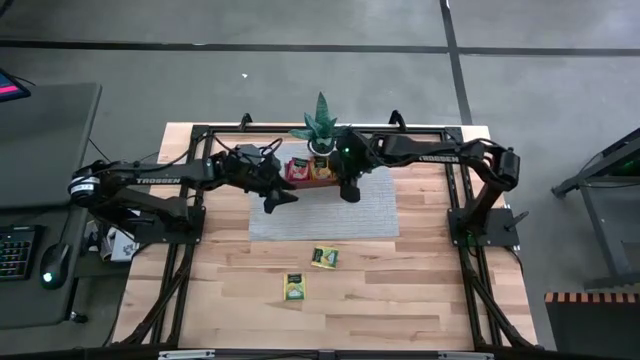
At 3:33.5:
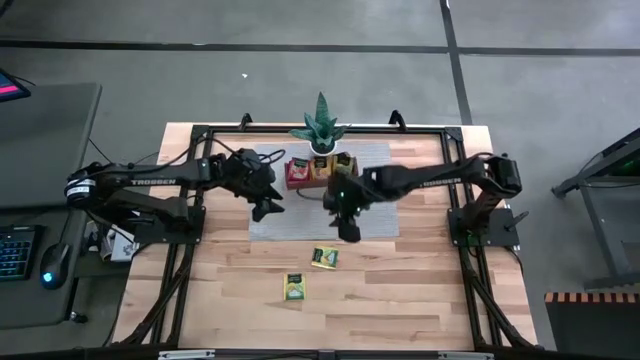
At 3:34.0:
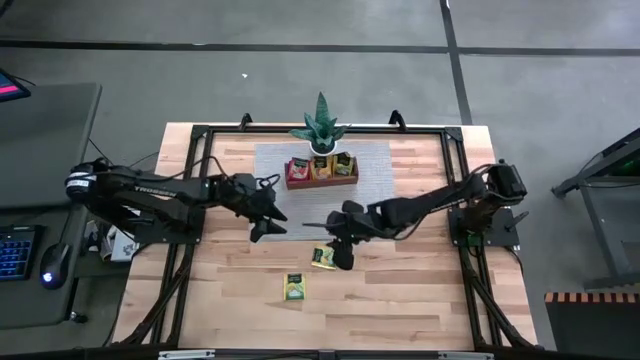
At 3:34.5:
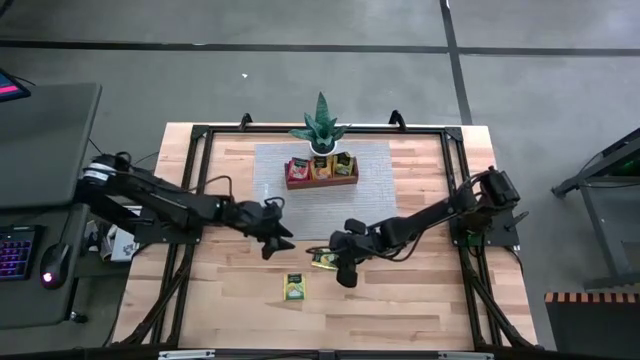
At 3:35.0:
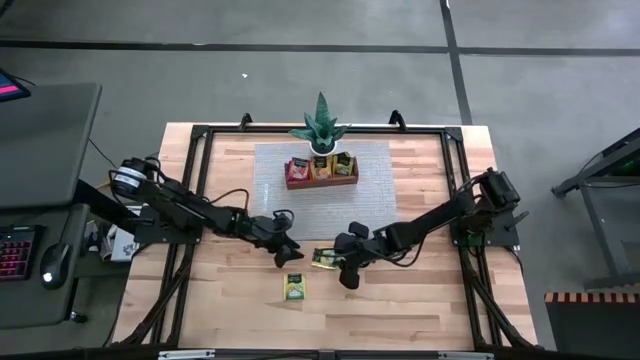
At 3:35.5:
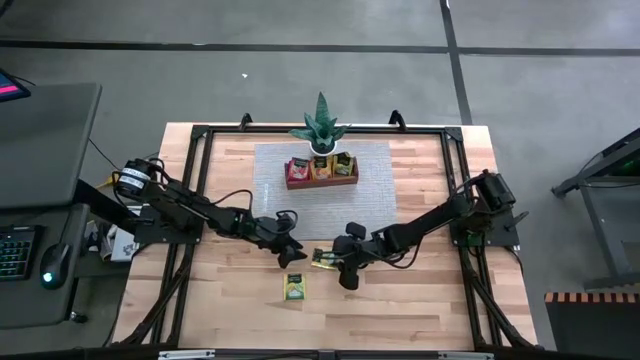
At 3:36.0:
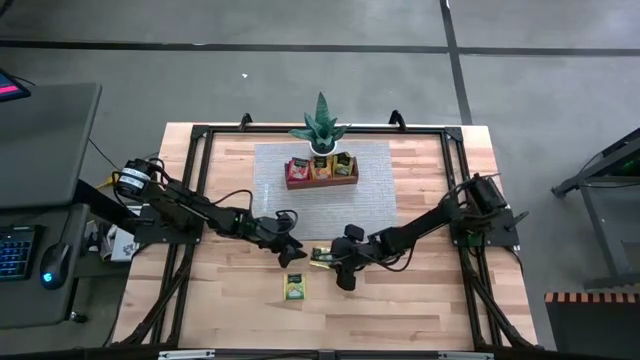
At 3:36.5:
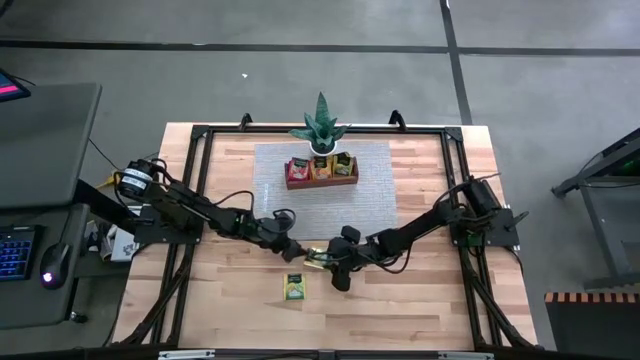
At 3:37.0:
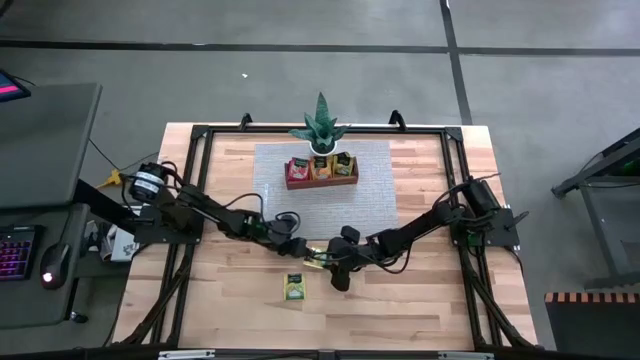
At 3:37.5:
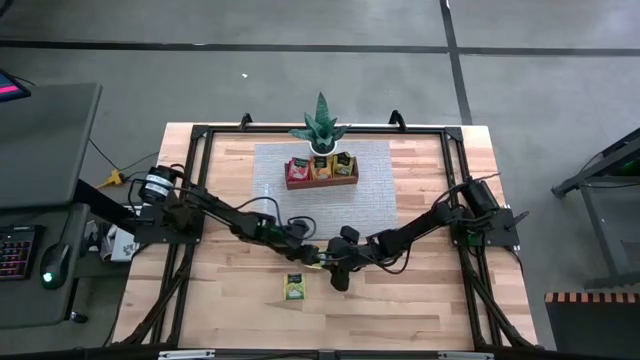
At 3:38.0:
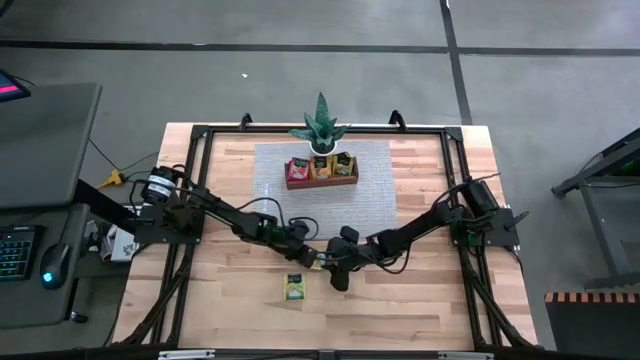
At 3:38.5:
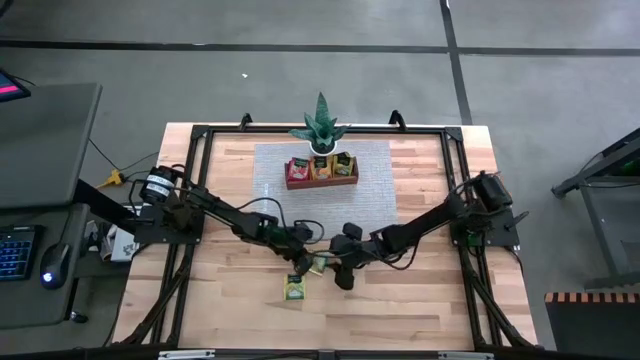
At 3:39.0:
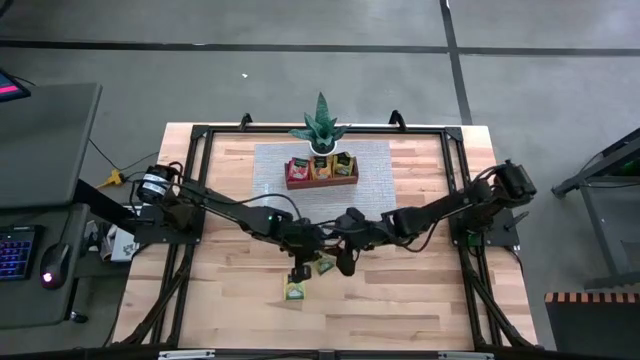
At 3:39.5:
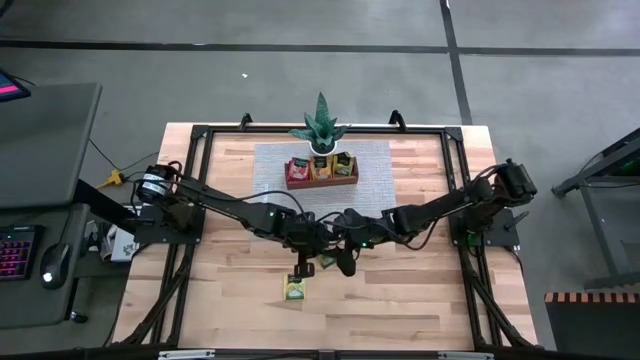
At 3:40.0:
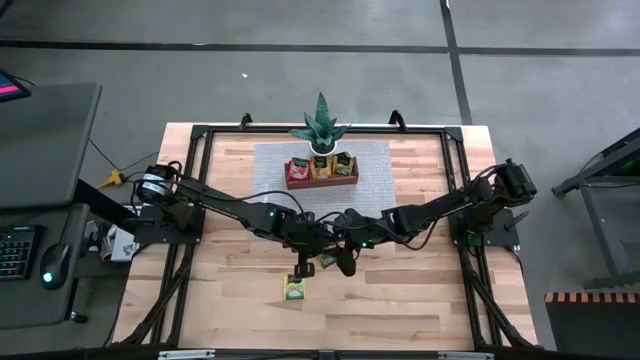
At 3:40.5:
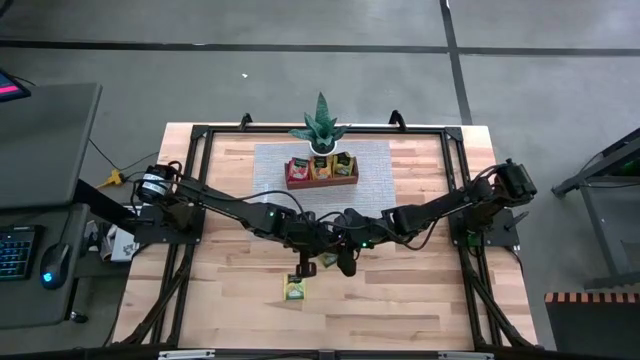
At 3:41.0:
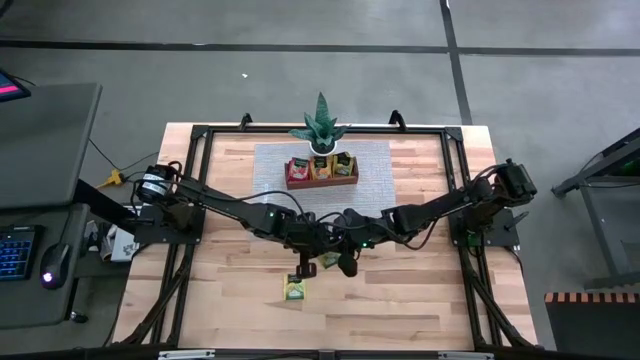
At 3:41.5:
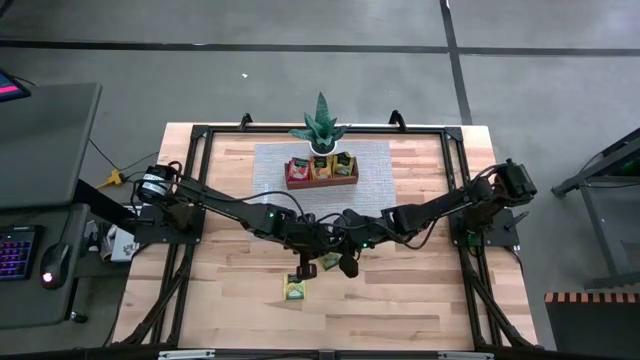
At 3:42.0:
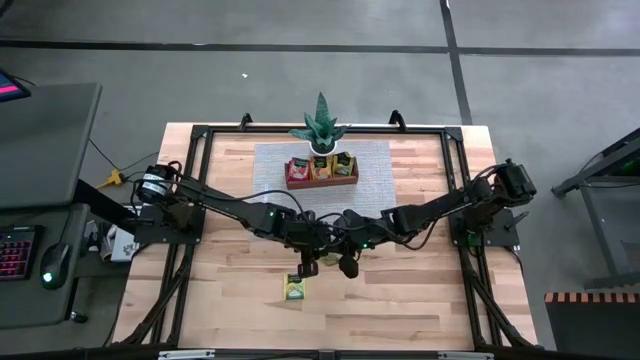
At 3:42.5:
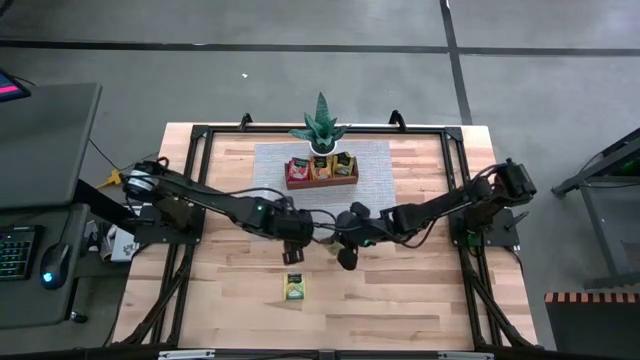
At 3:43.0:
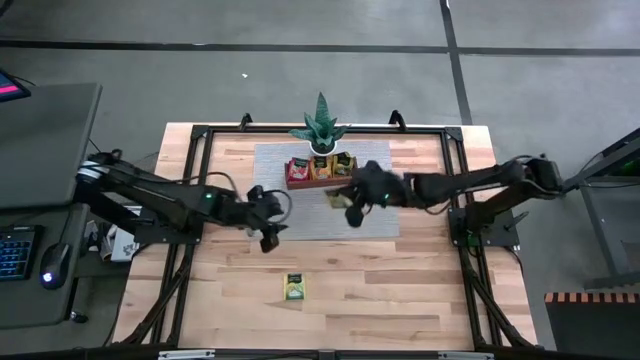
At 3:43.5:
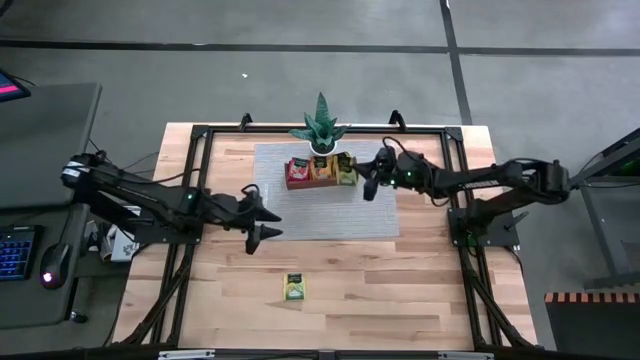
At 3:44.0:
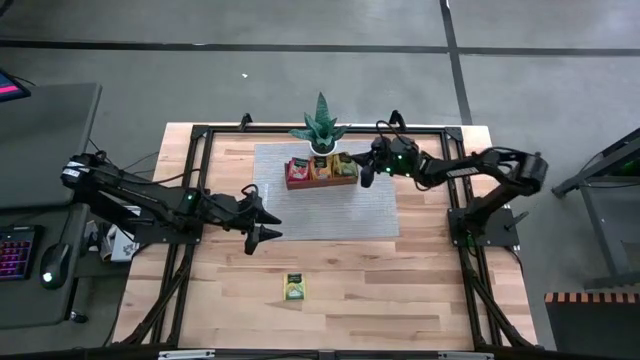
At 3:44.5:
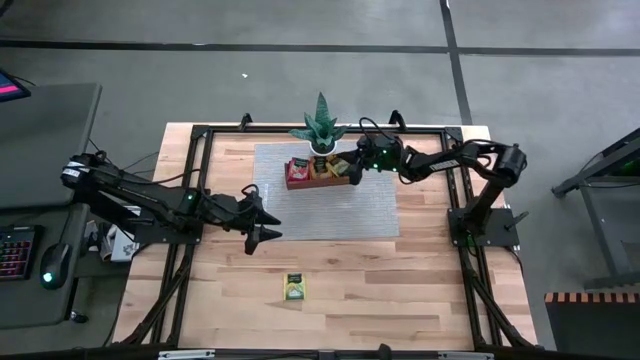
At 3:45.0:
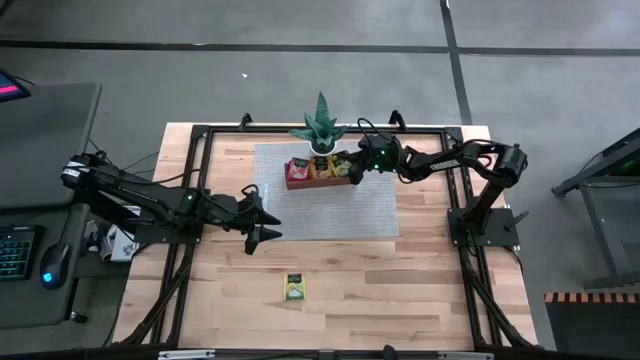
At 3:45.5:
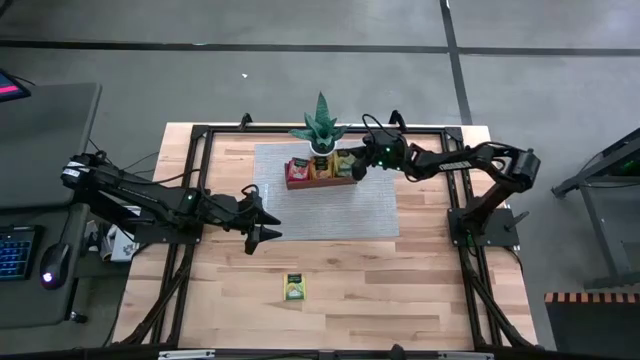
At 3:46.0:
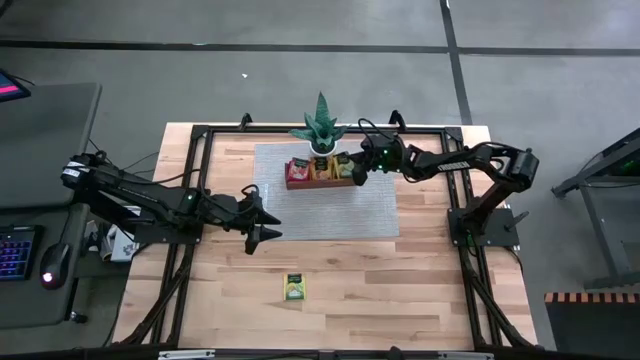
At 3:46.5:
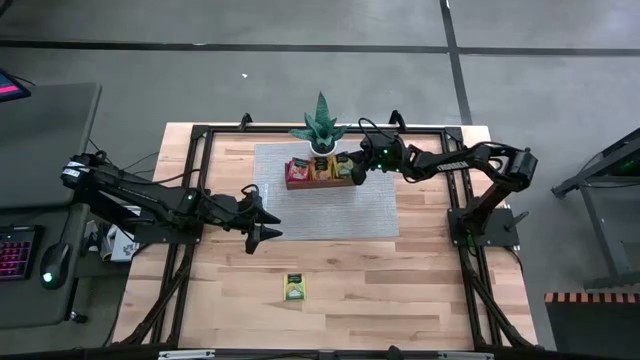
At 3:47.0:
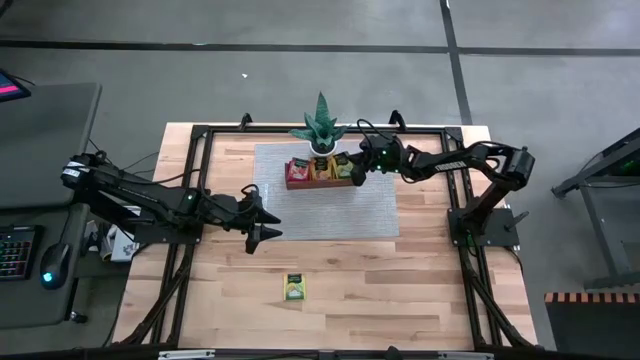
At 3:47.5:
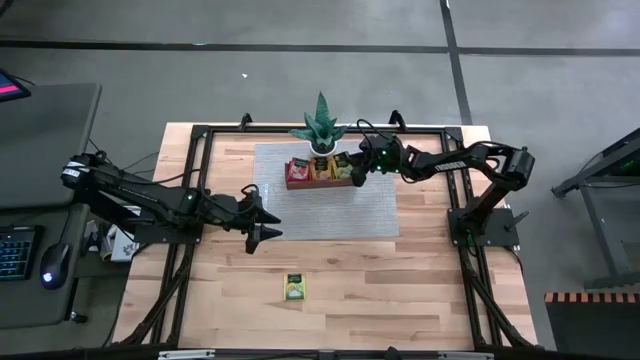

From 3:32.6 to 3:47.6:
Task: Pick & Place Tea
Put the yellow tea bag into the right section of the wooden organizer

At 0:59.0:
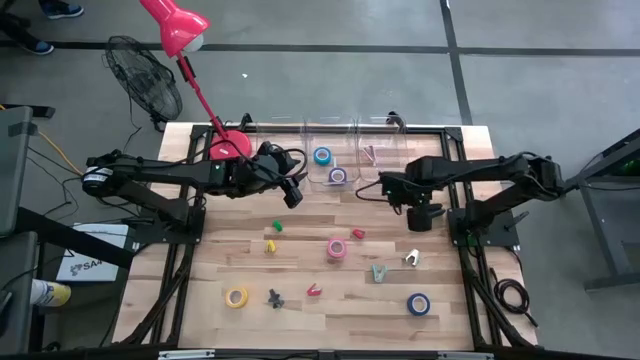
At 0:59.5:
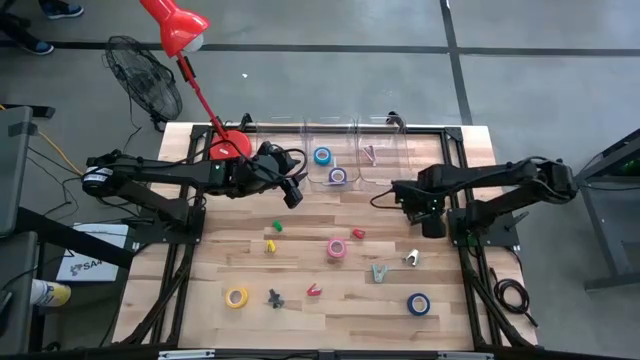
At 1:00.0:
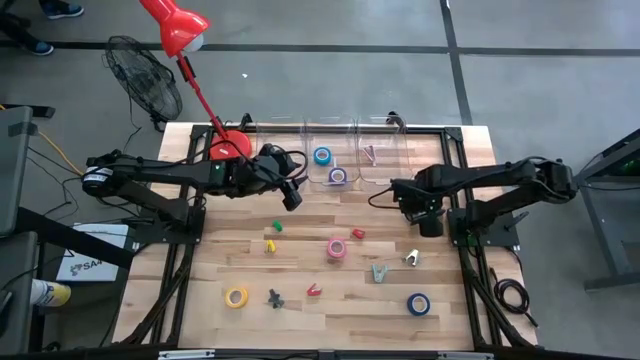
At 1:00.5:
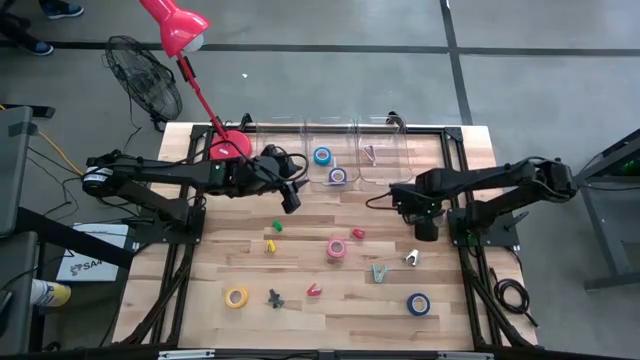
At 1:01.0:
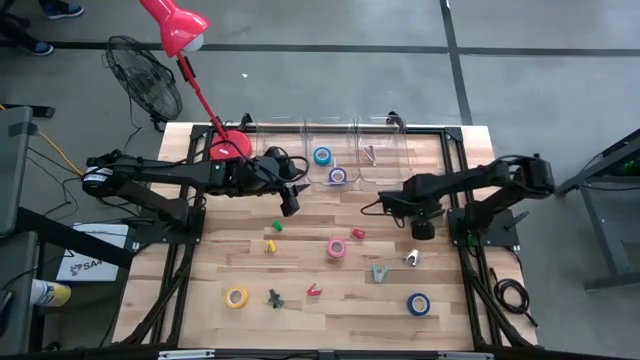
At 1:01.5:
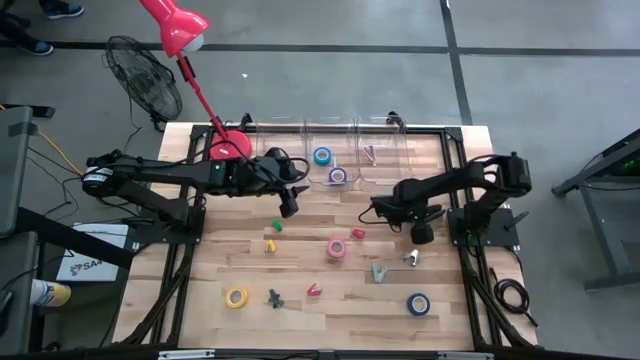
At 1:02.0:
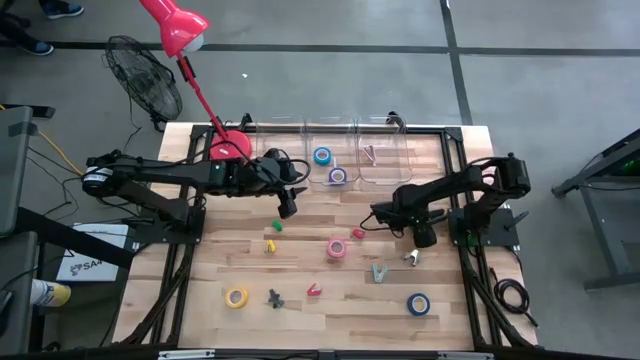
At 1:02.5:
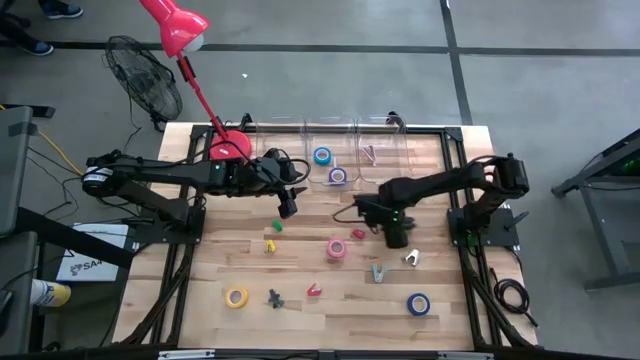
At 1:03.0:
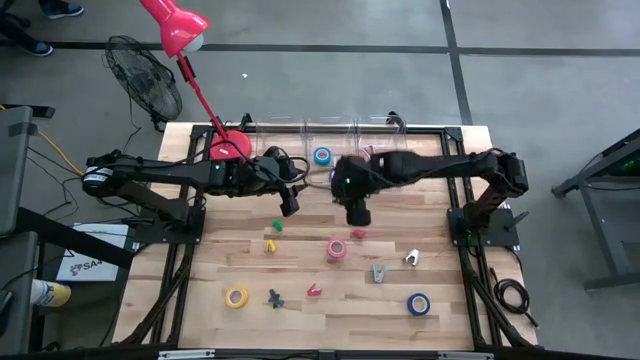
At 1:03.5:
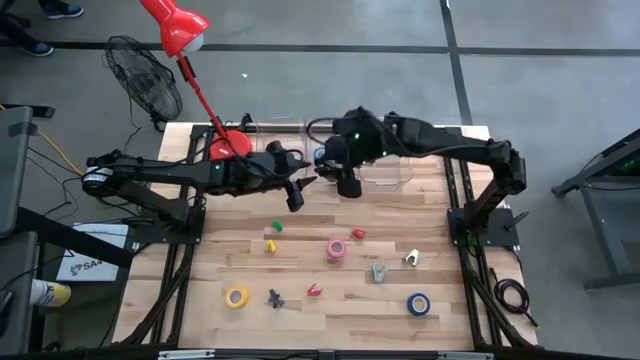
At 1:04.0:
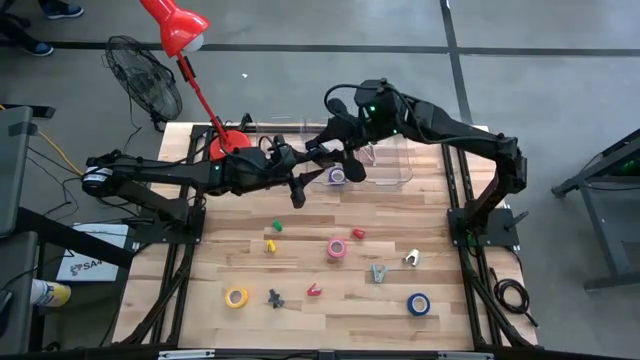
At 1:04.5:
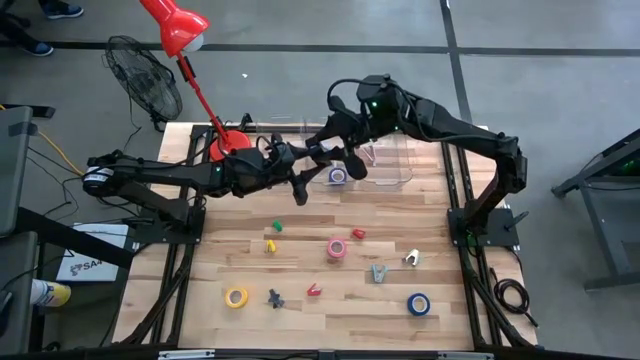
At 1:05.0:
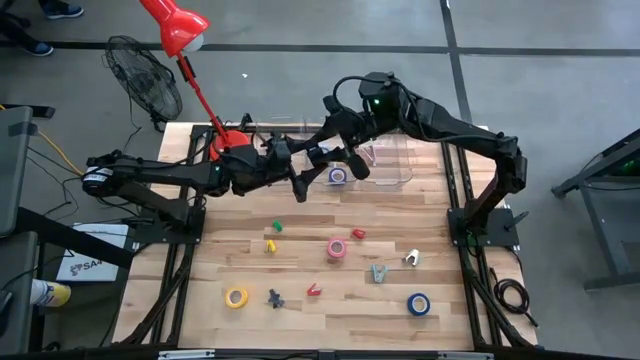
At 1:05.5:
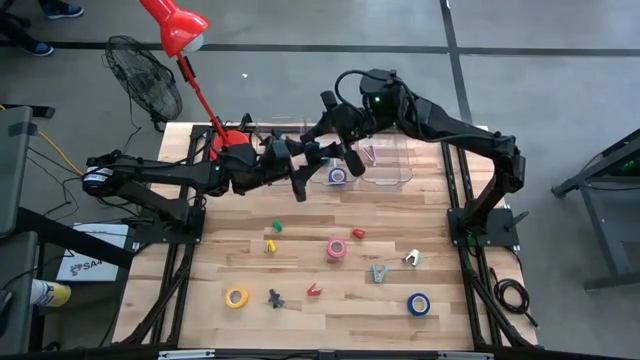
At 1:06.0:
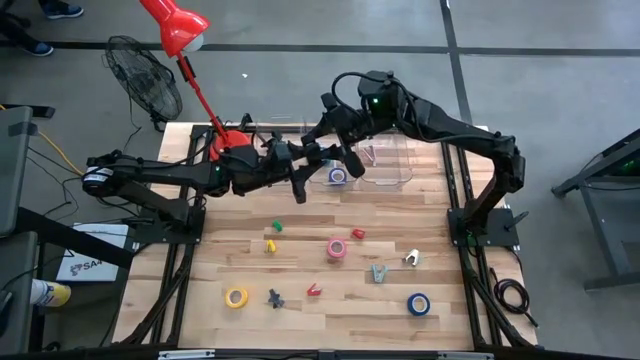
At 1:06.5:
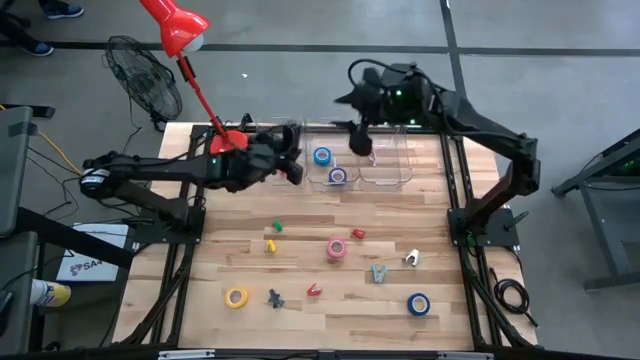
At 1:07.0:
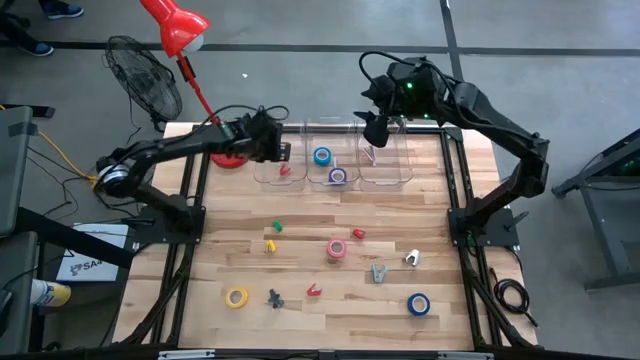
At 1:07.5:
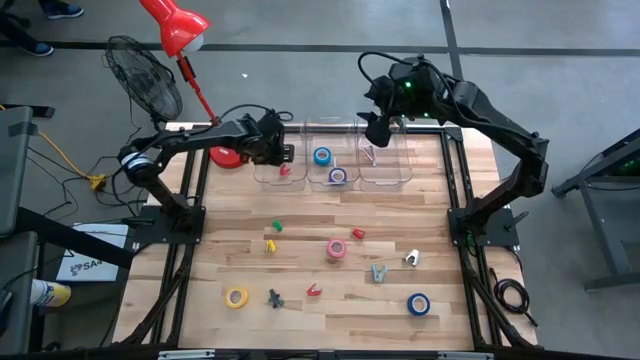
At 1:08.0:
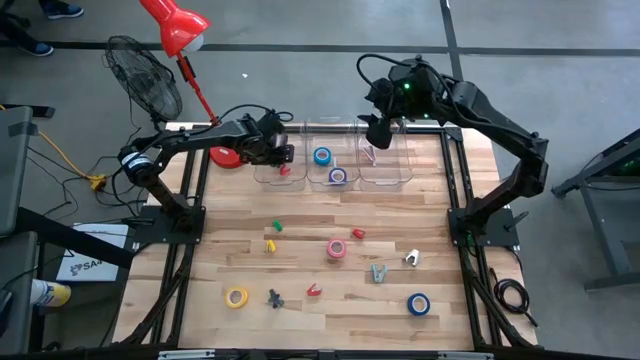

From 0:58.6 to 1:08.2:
Task: Pick and place Stapler, Stapler remover, tape
Put the black stapler into the left transparent bin
